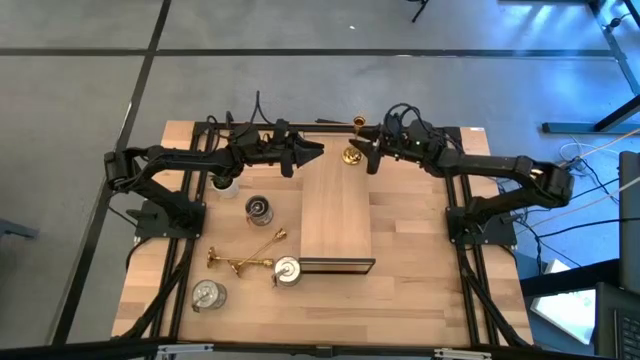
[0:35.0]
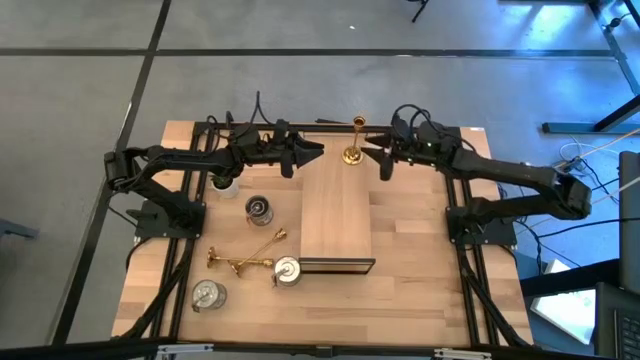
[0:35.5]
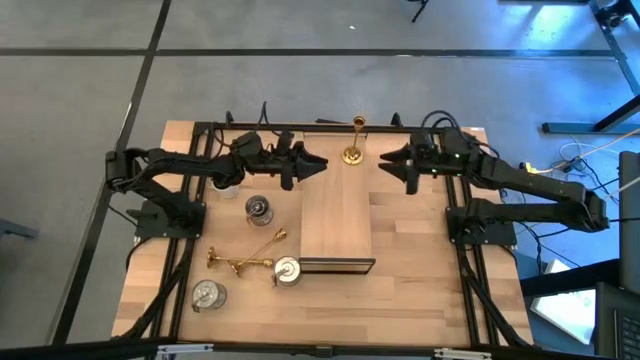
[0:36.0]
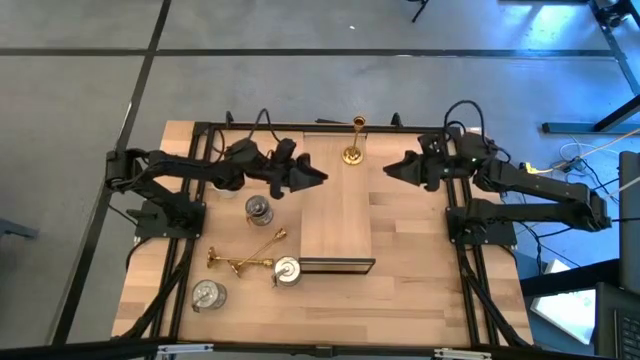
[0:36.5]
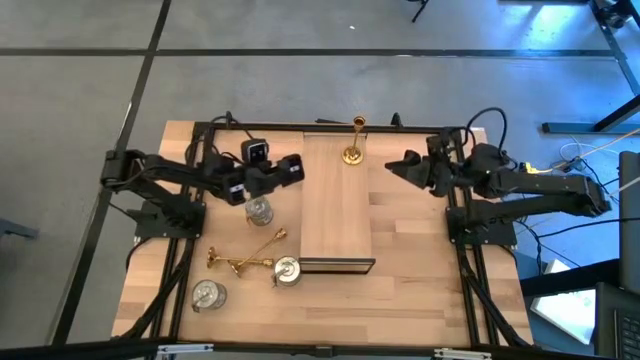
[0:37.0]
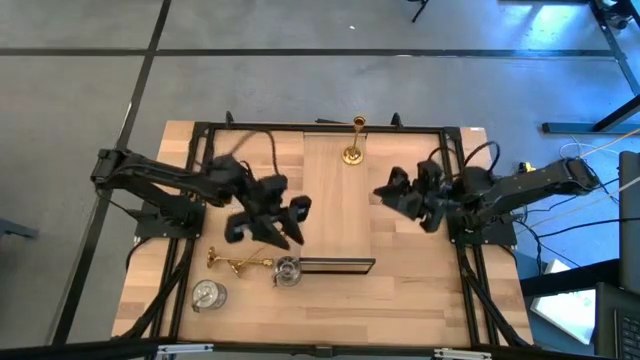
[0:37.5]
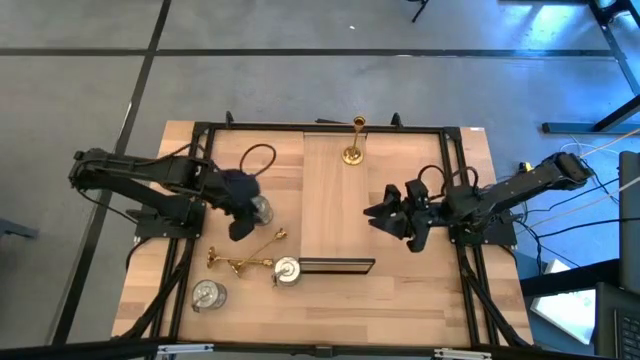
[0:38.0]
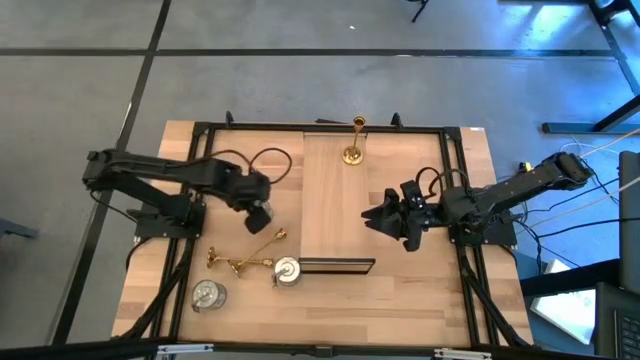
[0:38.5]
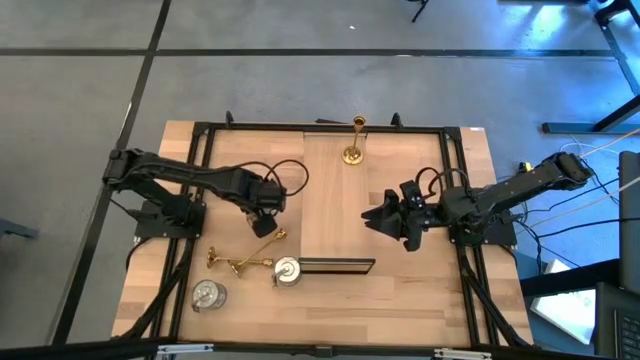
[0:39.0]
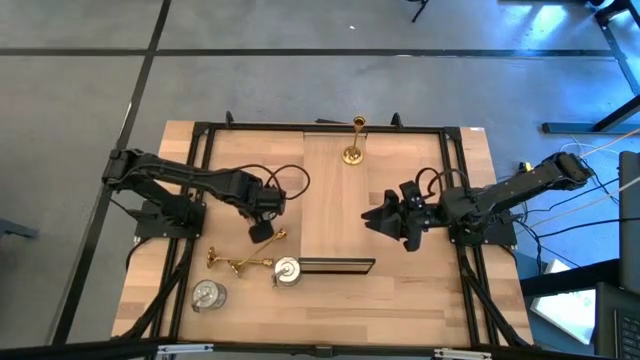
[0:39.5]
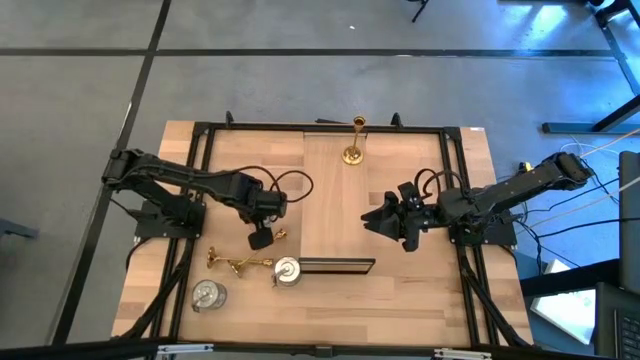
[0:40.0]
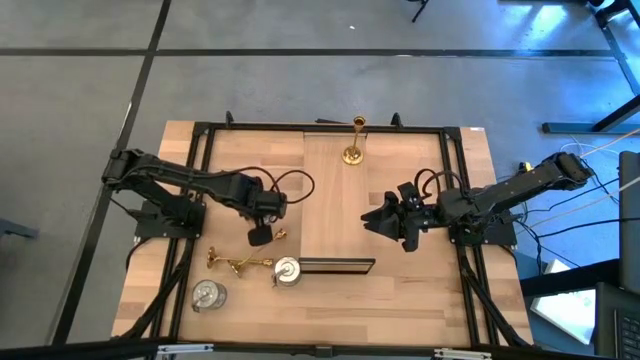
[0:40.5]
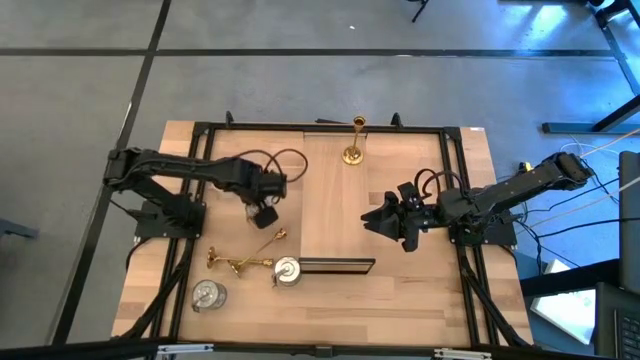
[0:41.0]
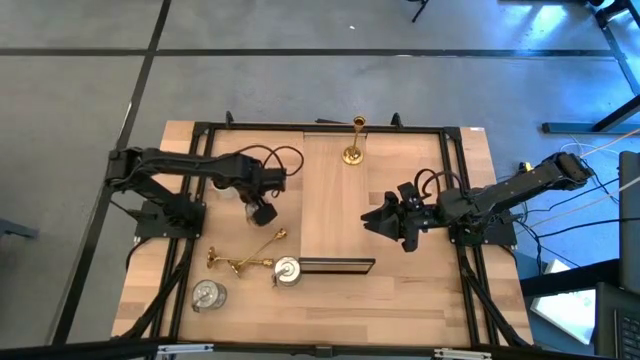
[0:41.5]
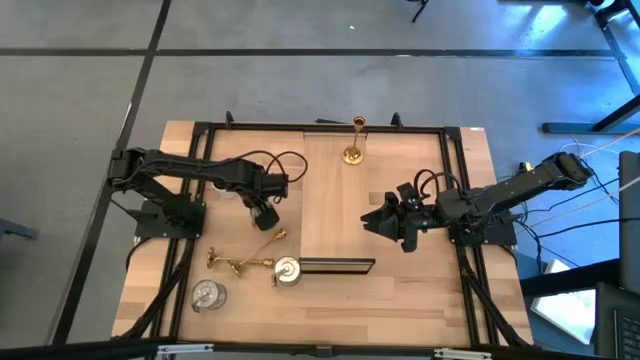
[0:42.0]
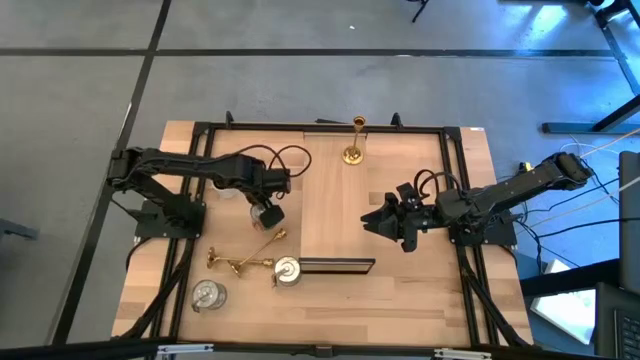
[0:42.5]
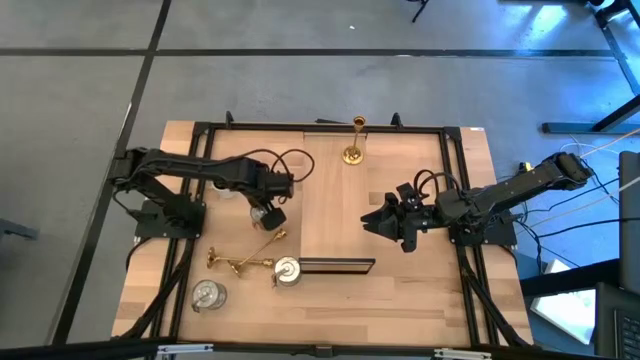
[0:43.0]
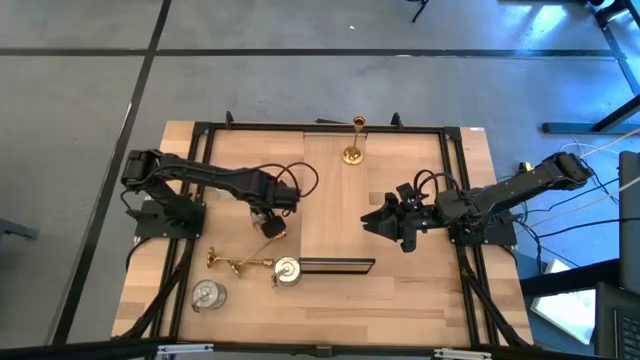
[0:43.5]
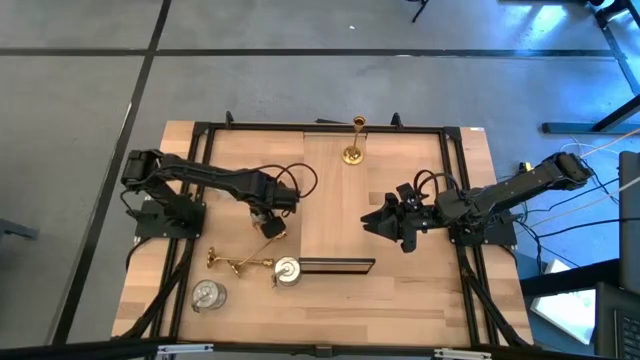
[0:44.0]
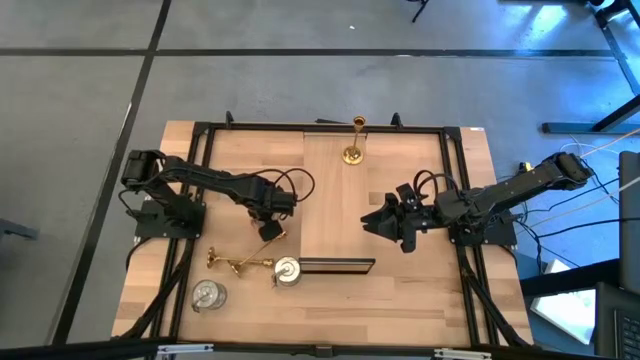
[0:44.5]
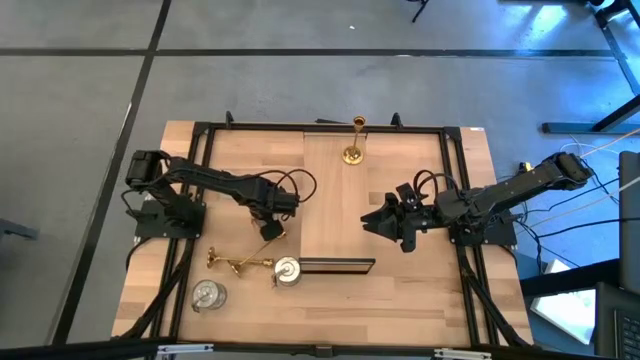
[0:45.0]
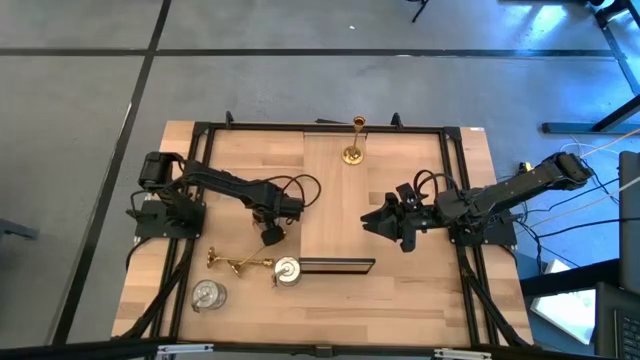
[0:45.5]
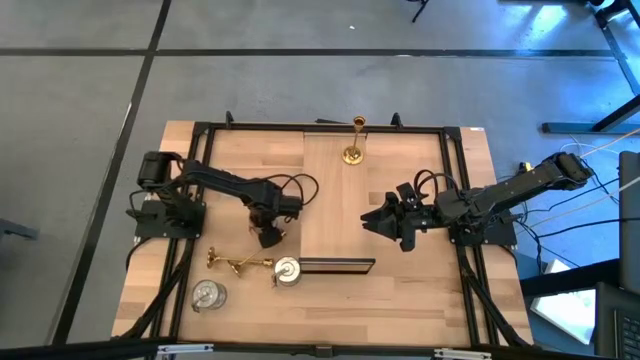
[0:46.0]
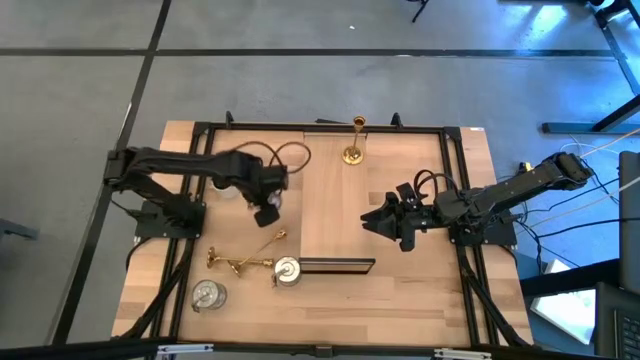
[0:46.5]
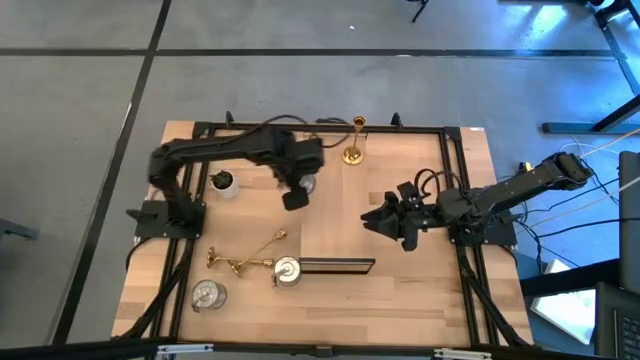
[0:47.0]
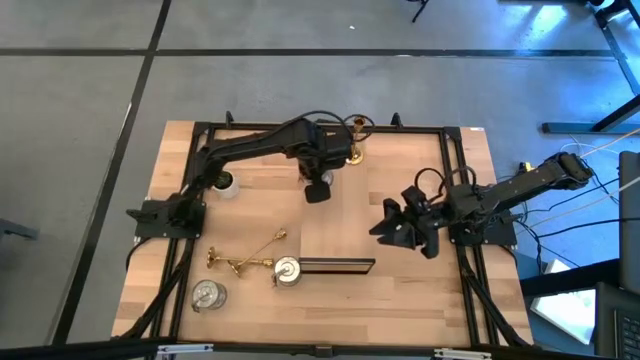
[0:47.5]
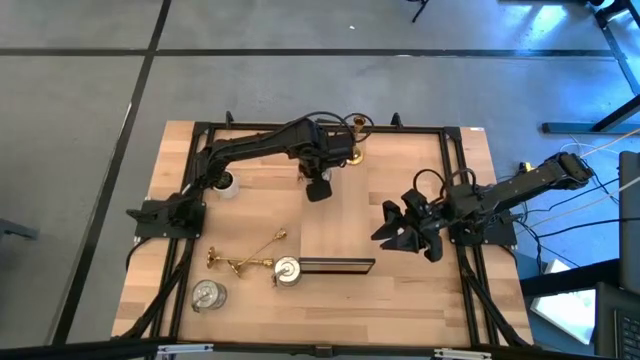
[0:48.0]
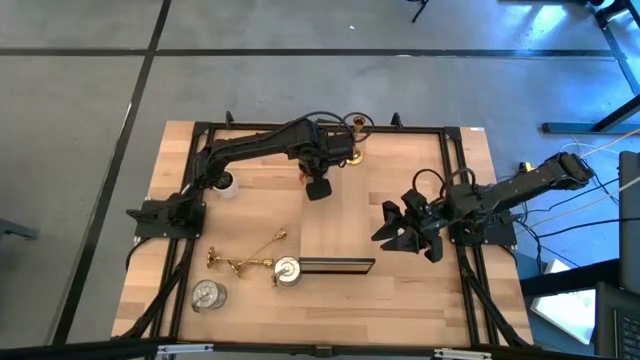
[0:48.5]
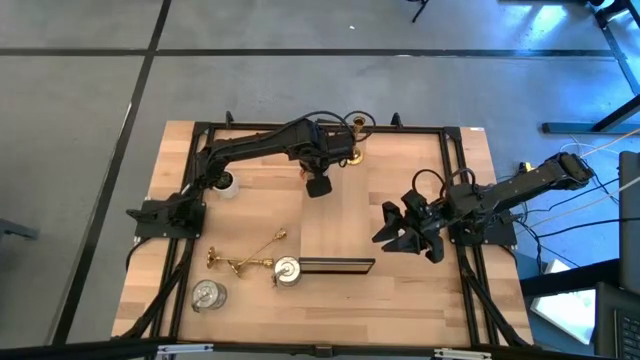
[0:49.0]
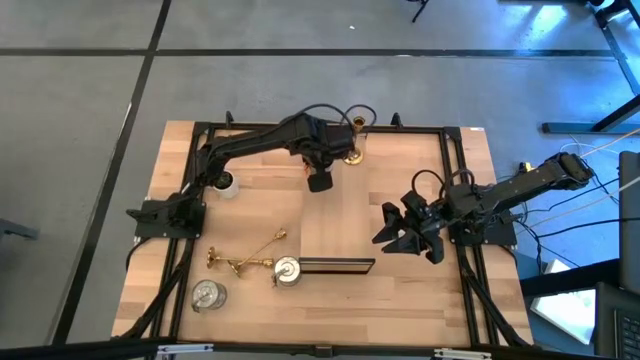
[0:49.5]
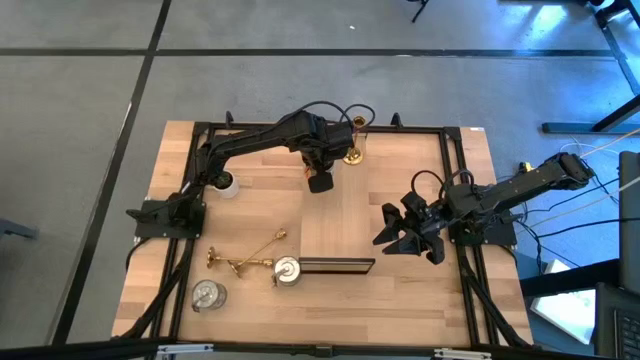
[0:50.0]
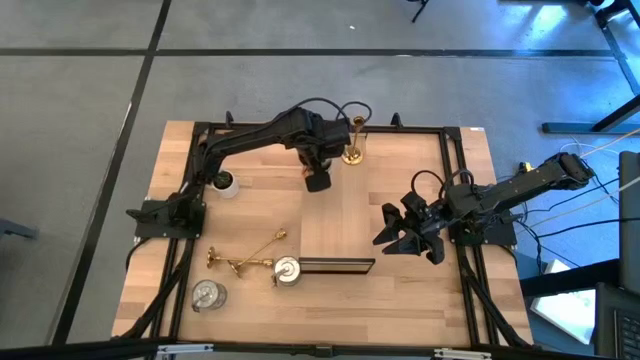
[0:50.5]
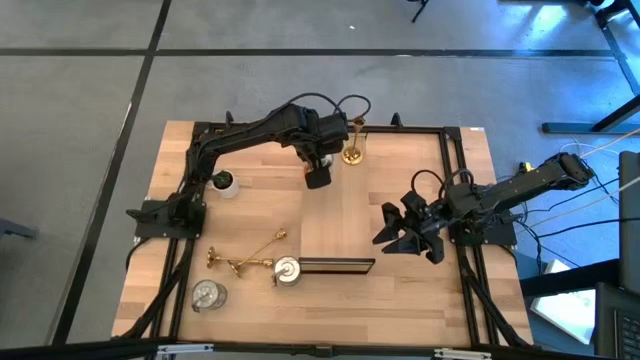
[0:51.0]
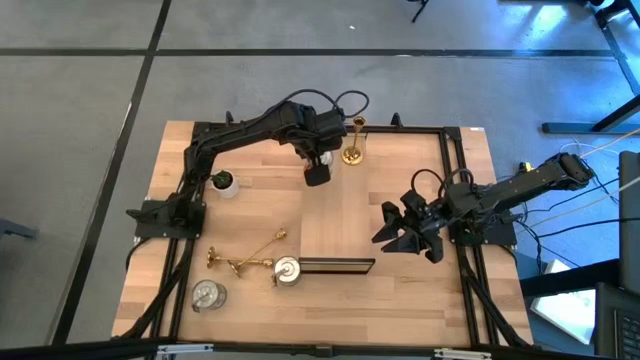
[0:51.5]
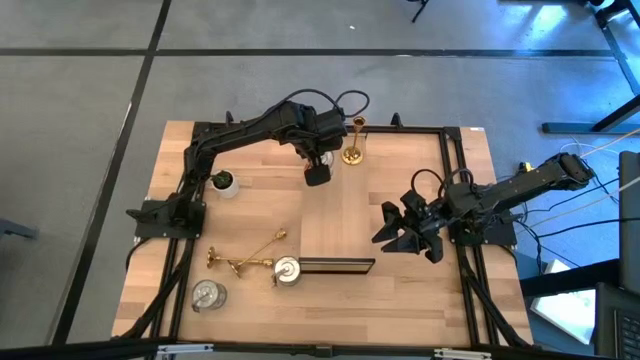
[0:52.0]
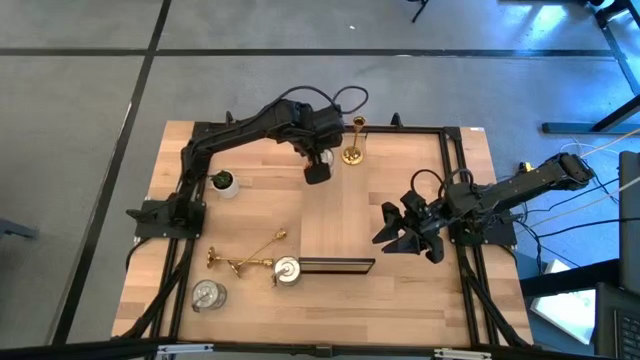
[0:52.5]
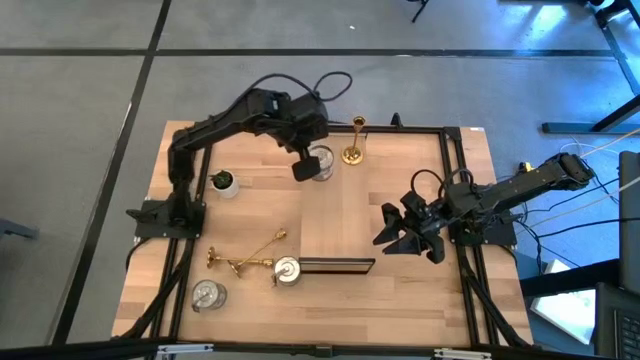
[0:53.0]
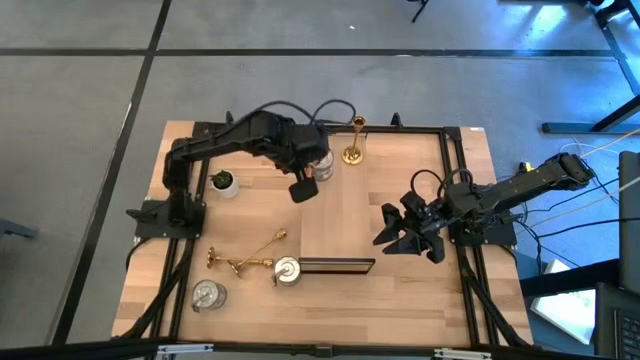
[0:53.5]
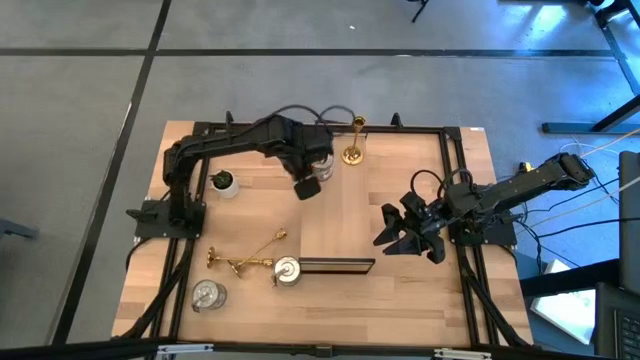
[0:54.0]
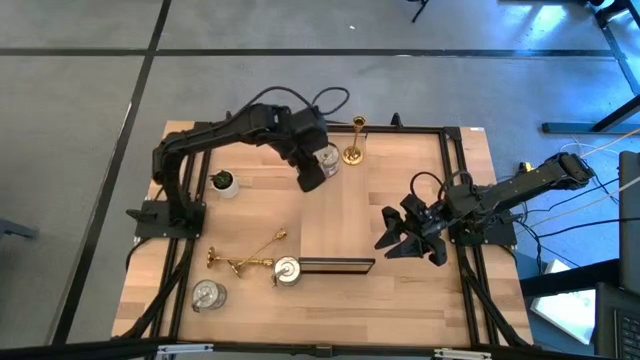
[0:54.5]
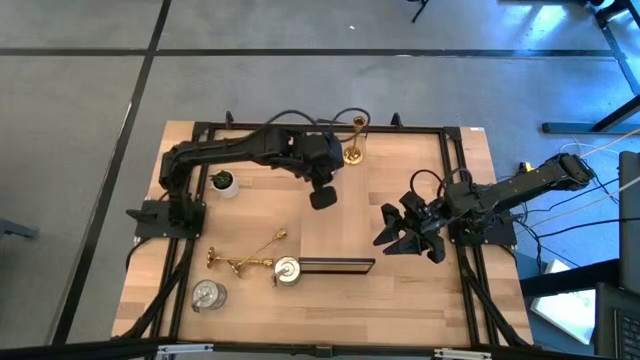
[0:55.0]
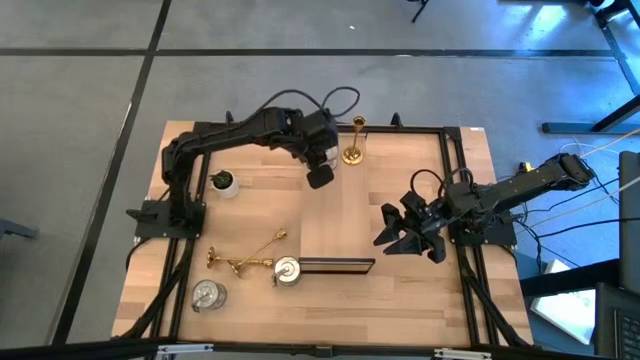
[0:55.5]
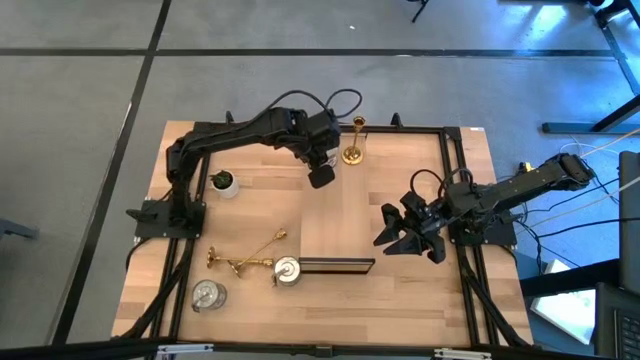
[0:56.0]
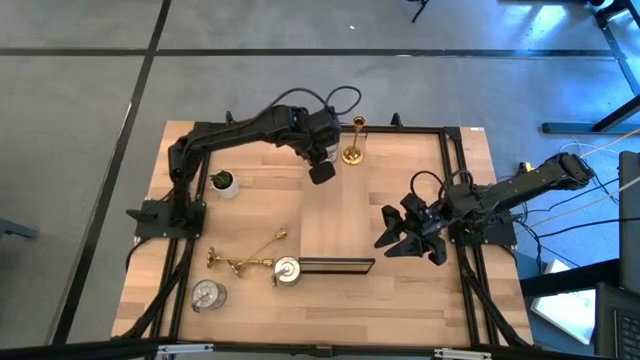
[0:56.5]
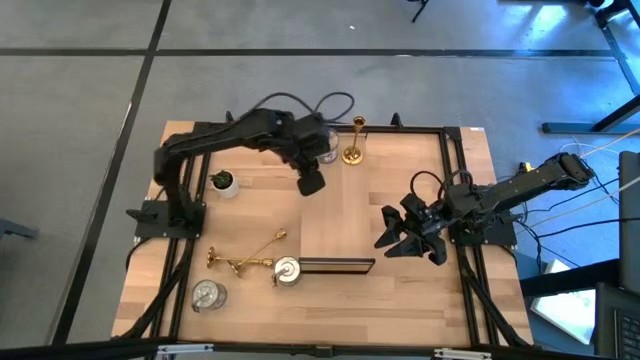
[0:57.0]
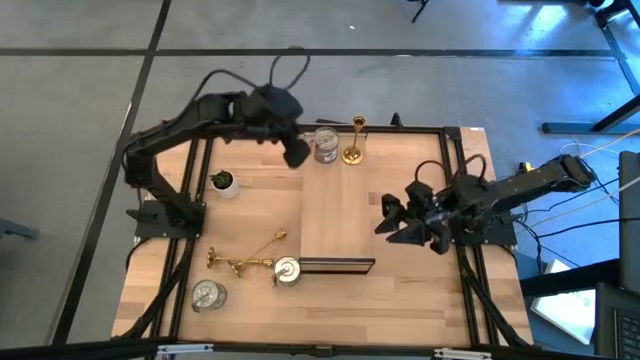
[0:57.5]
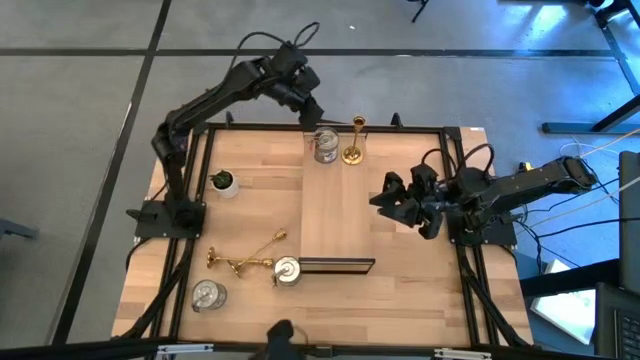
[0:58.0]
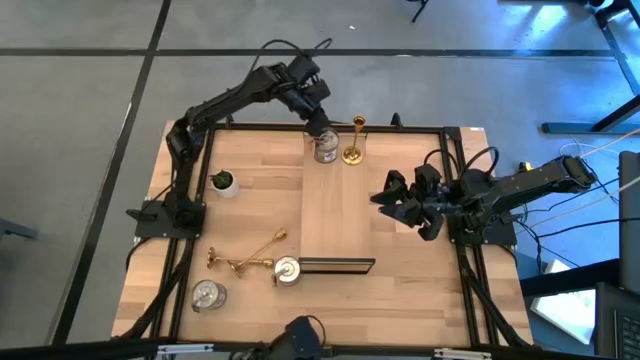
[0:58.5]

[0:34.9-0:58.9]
Task: Pick & Place candle stick holders
Put the top left scented candle on the shelf
